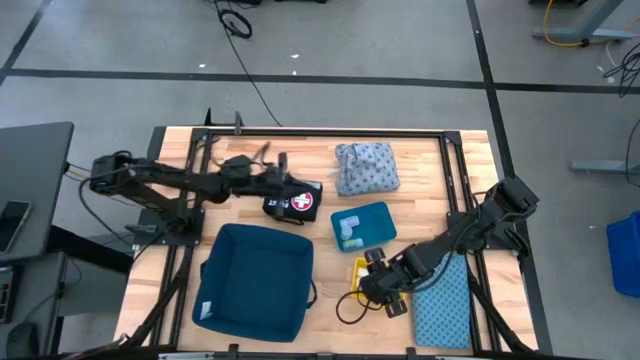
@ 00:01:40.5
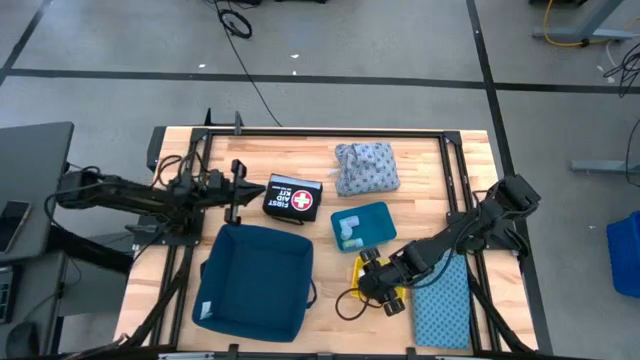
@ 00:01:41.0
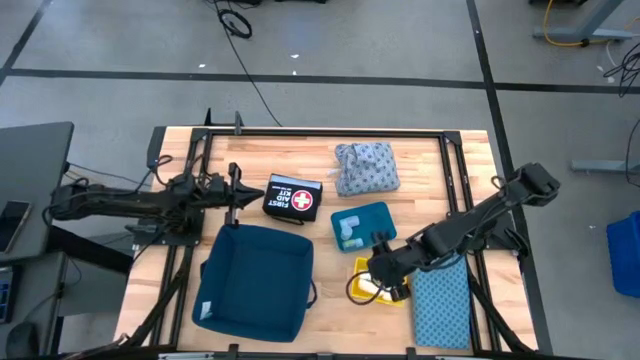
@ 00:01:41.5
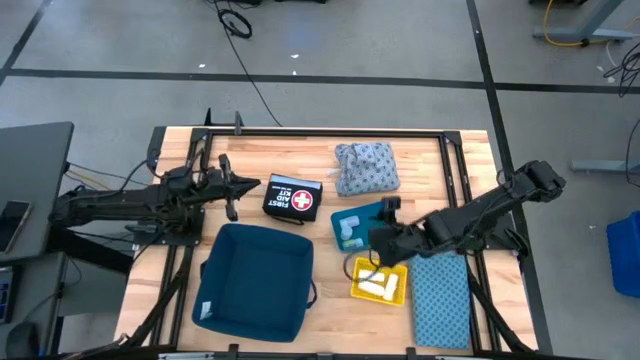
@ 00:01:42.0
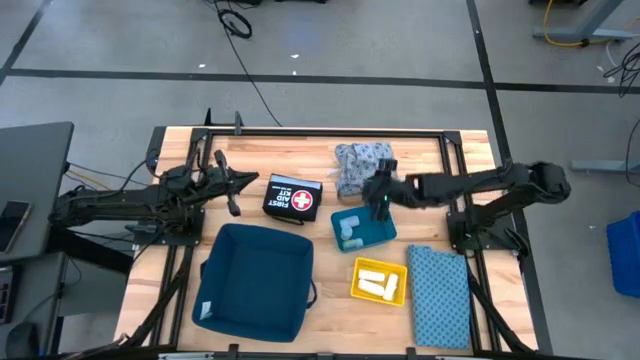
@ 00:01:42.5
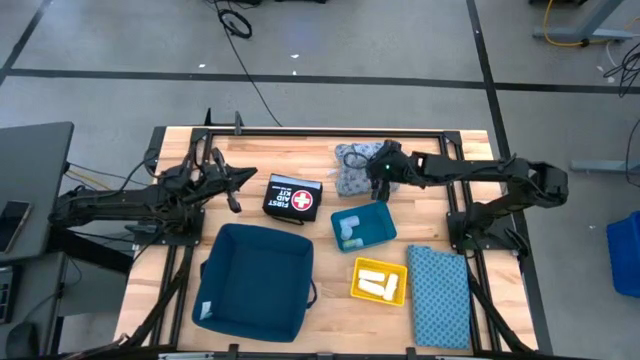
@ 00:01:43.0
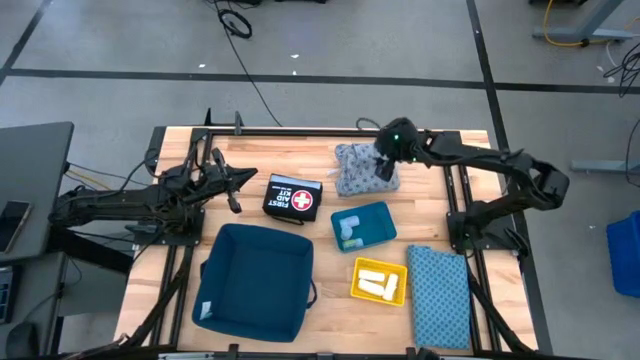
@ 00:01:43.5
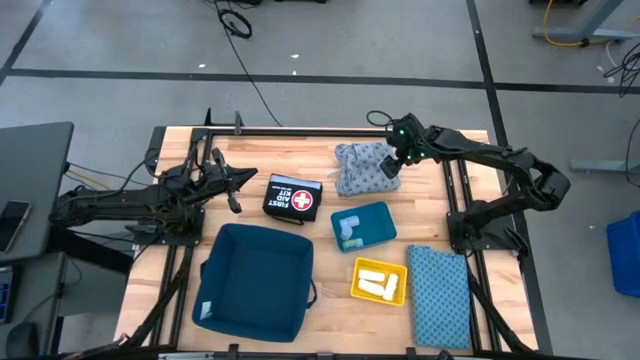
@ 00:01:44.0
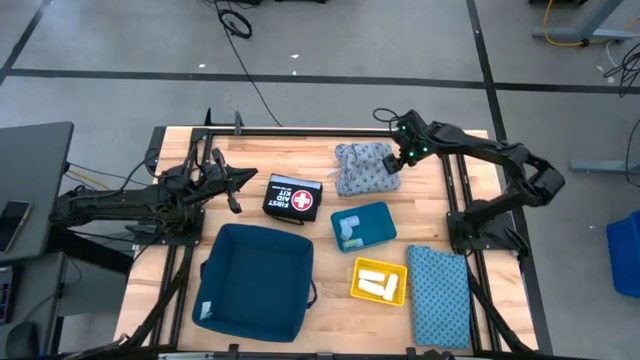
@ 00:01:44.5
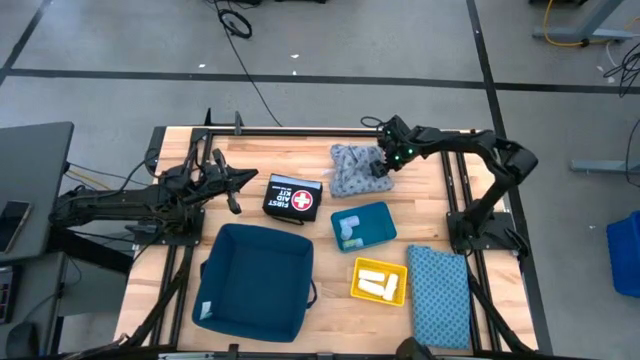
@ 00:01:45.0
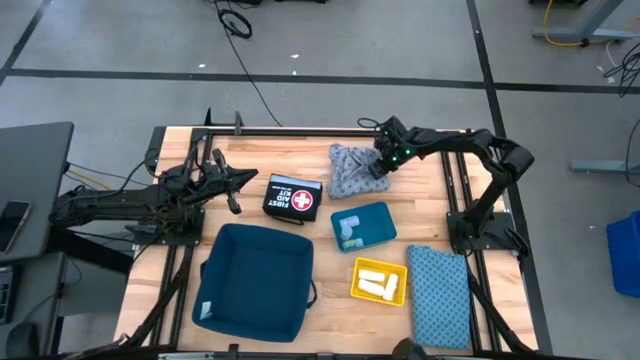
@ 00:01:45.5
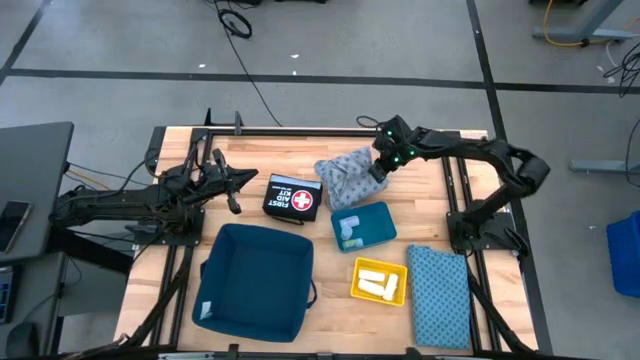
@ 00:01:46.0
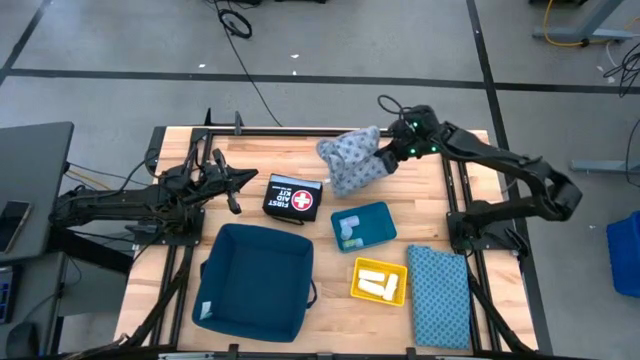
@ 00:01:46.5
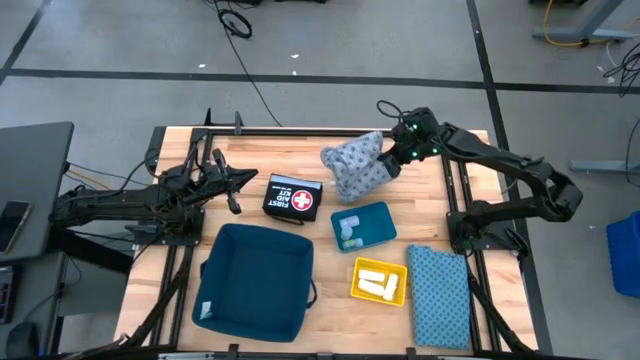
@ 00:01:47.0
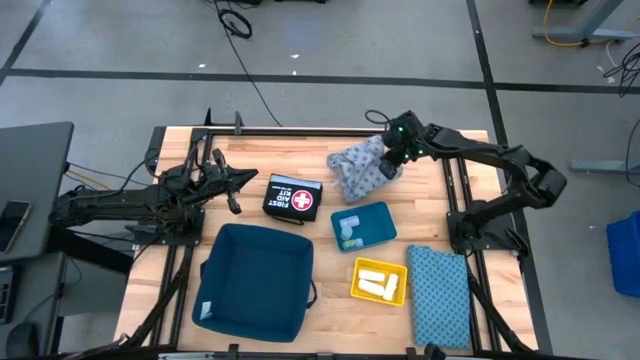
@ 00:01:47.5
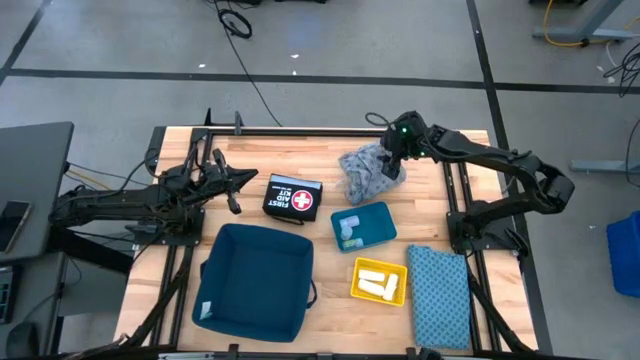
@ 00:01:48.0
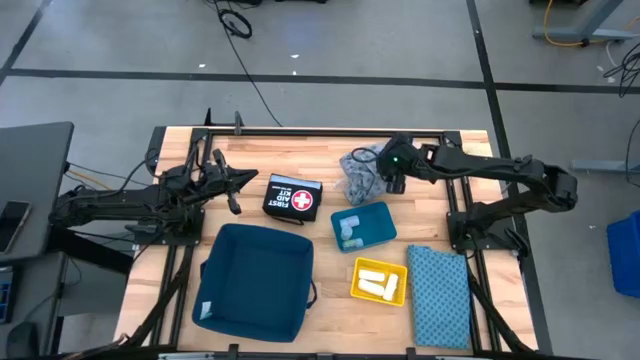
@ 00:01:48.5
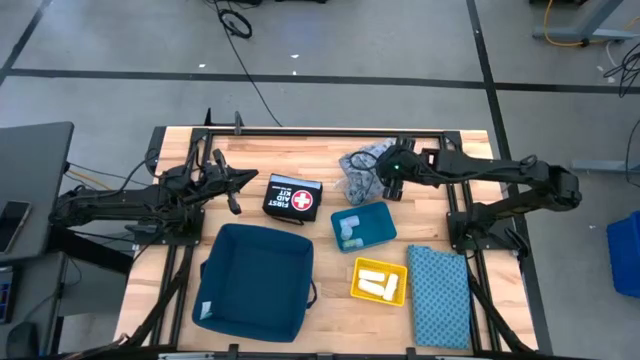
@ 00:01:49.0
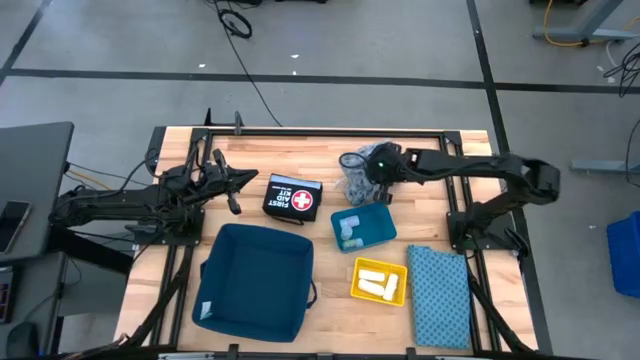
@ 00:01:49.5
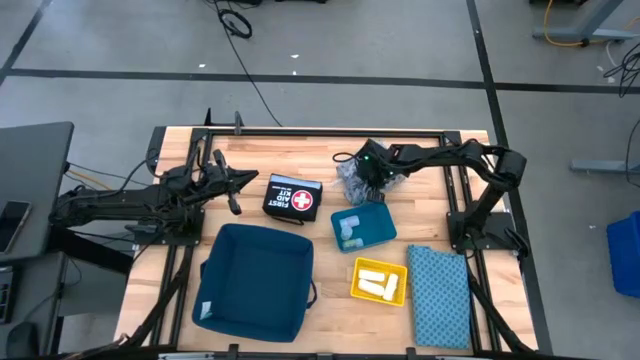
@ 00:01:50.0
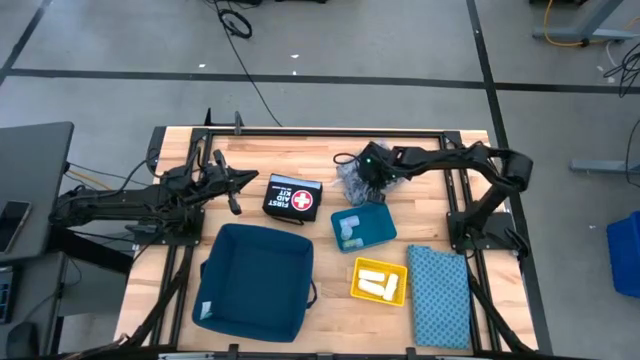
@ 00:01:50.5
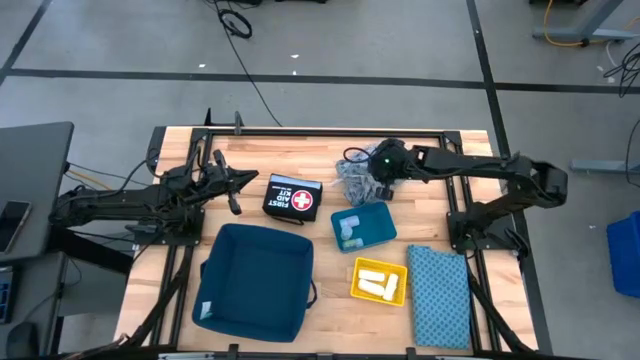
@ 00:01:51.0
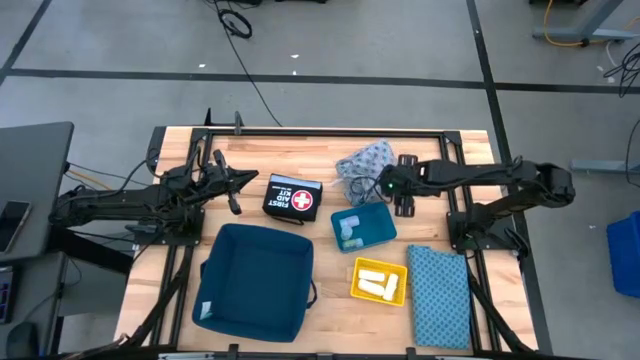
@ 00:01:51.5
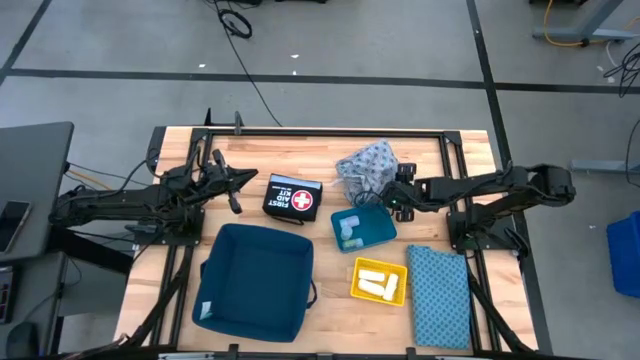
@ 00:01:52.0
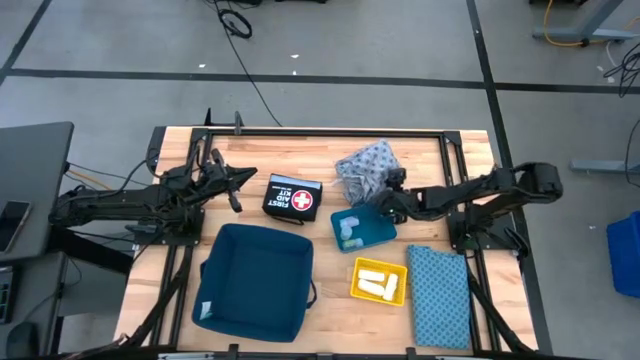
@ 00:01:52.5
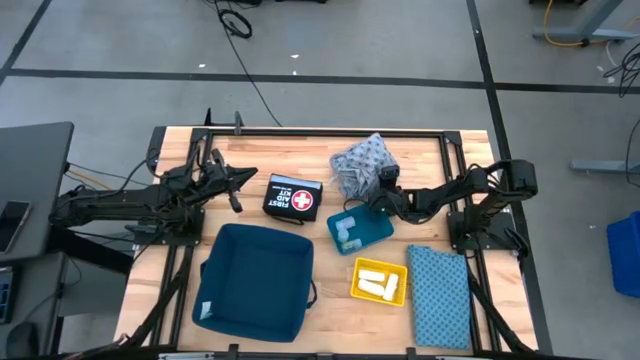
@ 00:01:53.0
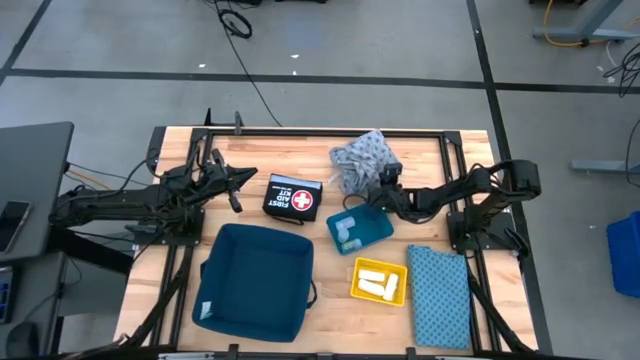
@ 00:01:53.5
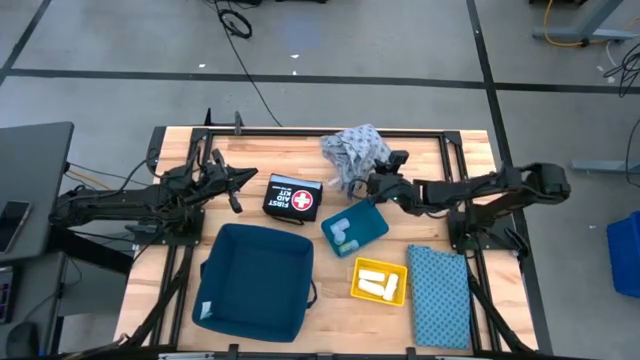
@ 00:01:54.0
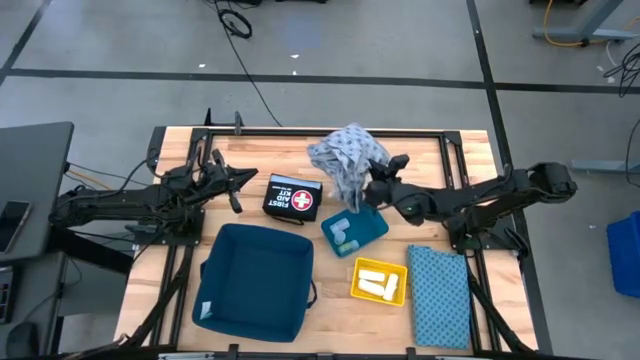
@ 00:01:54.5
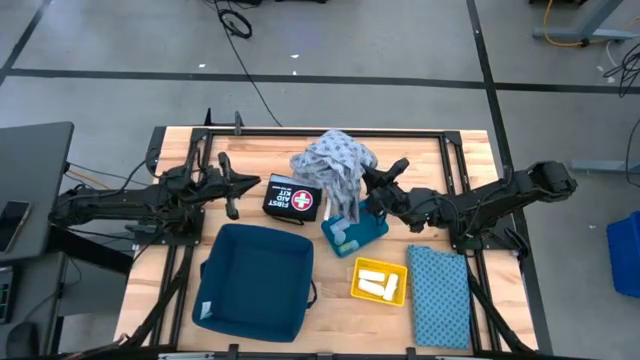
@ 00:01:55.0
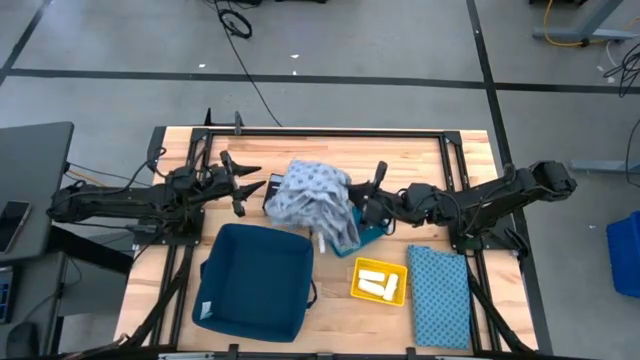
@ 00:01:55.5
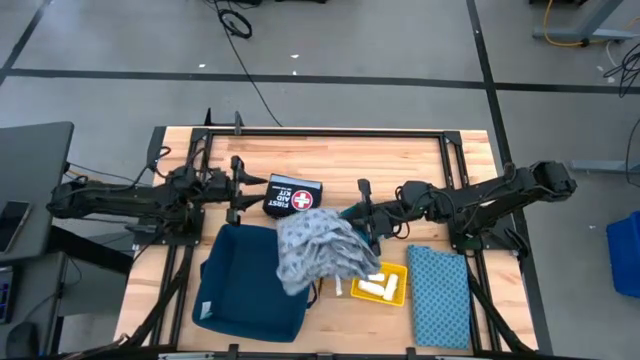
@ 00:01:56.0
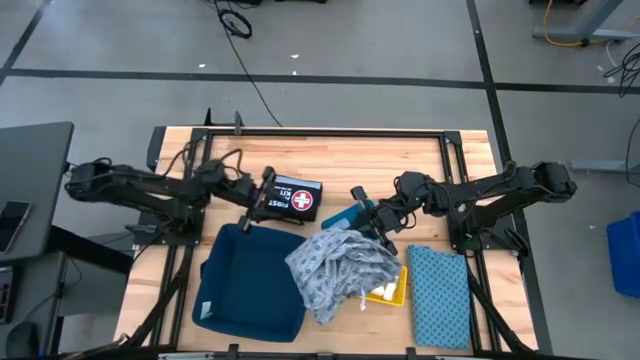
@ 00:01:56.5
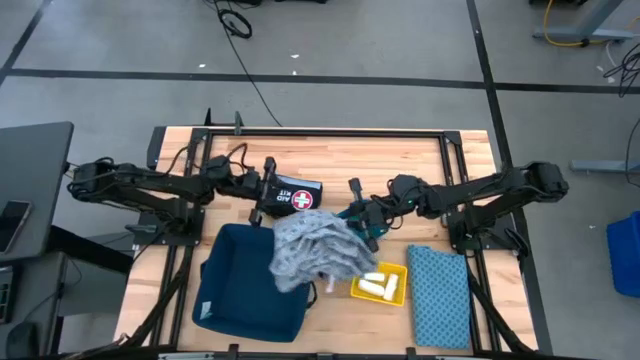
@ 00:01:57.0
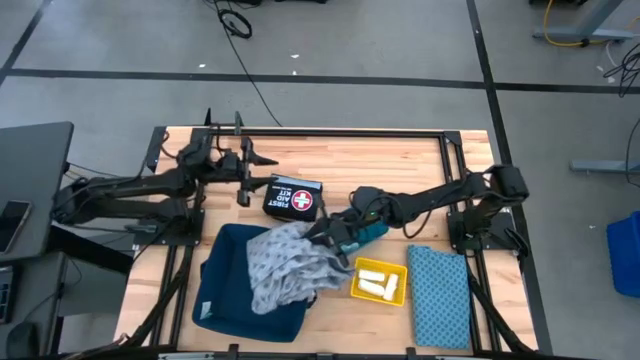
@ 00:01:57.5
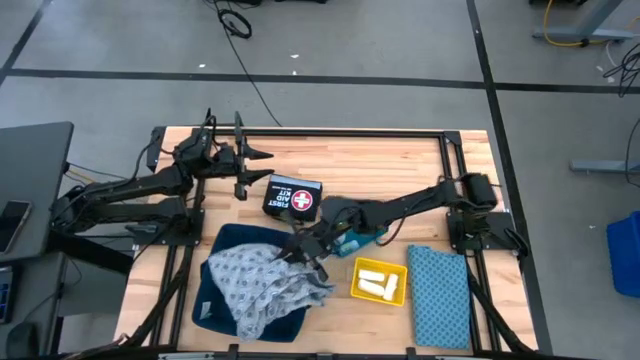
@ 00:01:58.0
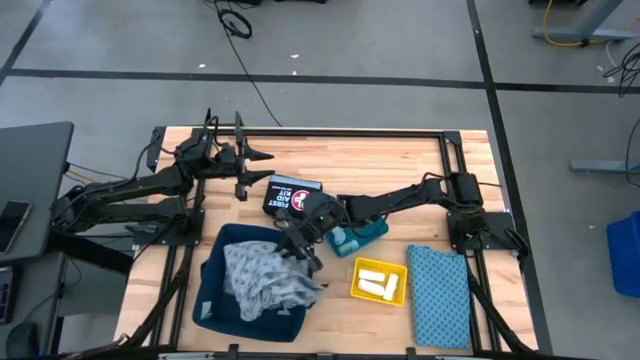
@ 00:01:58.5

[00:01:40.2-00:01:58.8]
Task: Pick & place medical supplies in basket/bin
Put the gray gown into the blue bin

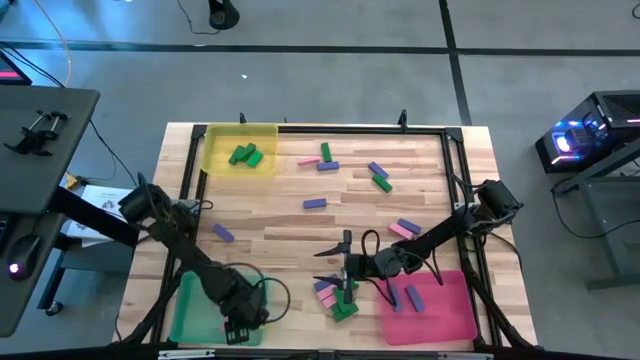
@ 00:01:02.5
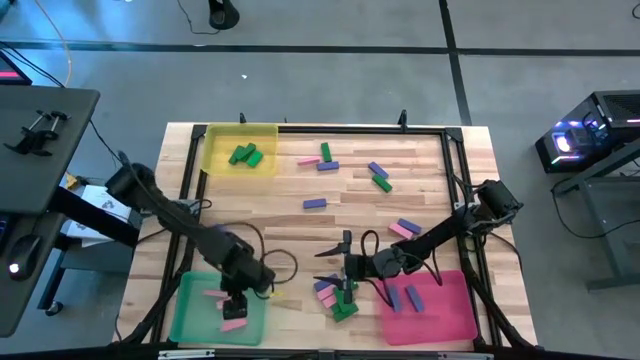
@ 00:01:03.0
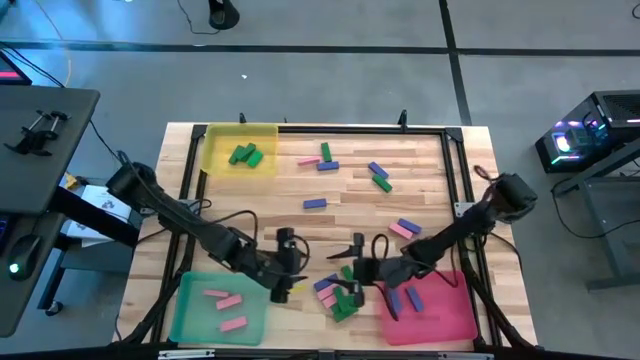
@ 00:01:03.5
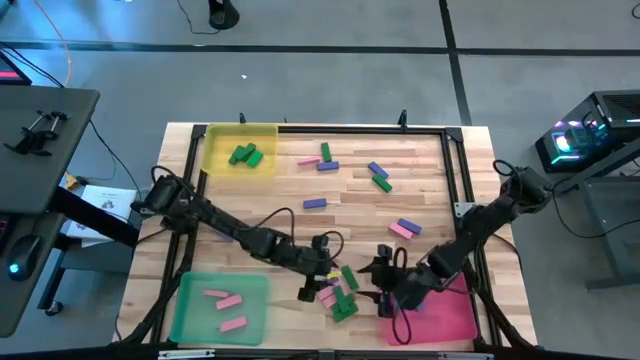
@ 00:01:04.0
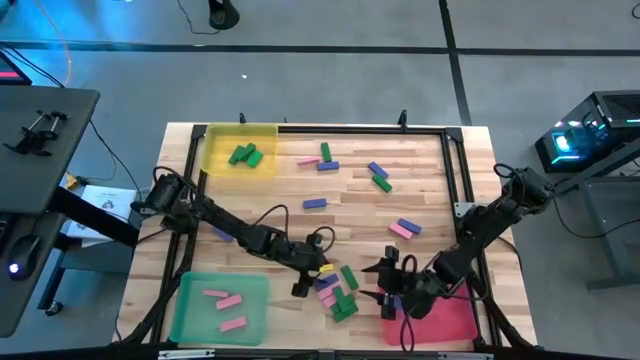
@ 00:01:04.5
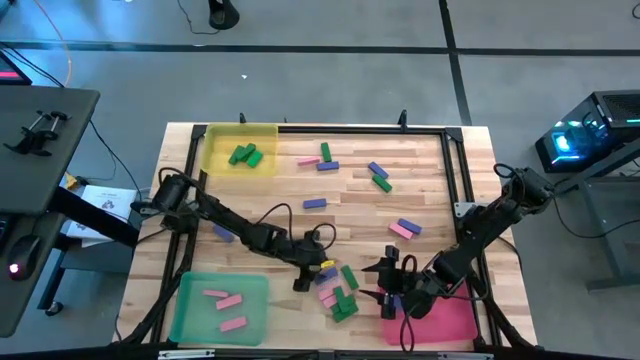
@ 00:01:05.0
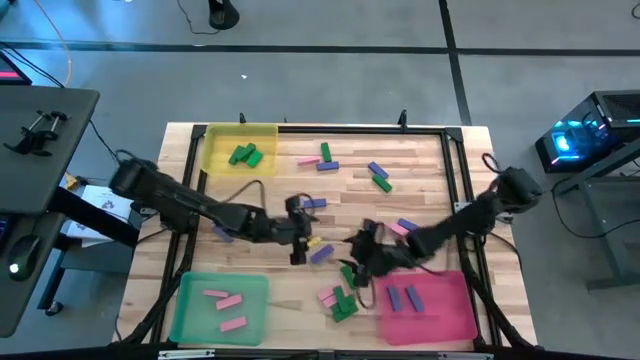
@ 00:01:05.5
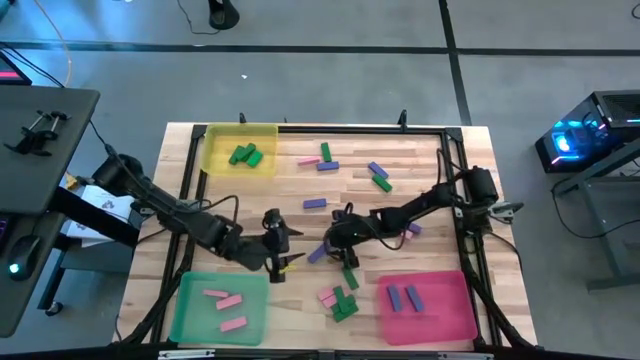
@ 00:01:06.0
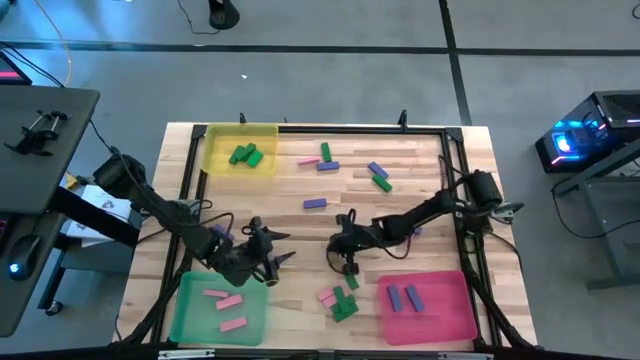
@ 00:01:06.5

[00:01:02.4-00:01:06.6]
Task: Sort blocks
Put the violet block into the pink bin
